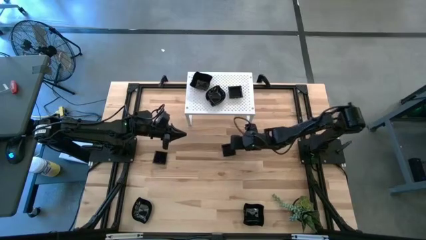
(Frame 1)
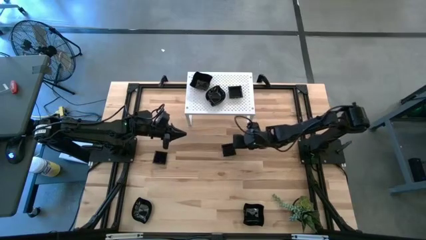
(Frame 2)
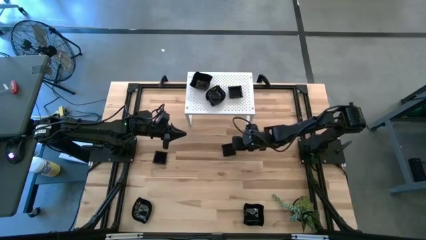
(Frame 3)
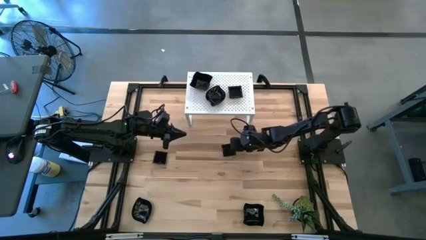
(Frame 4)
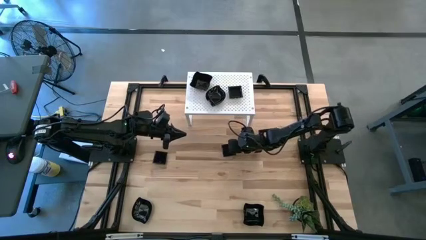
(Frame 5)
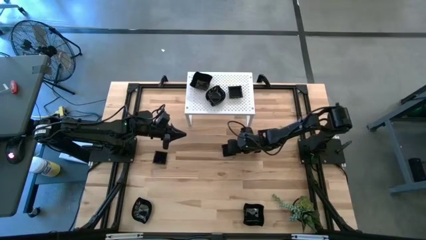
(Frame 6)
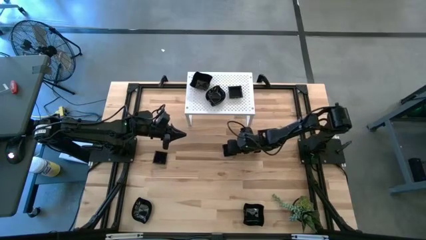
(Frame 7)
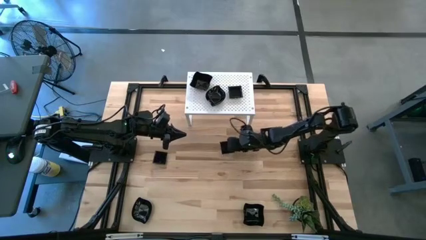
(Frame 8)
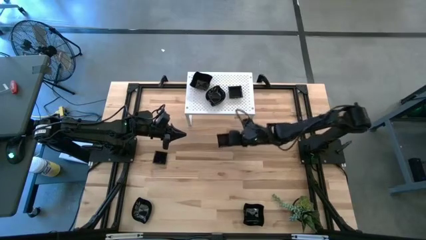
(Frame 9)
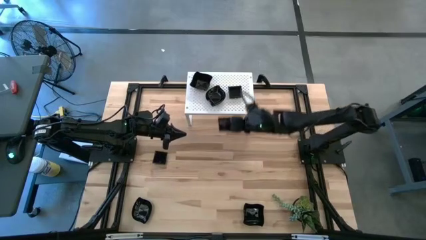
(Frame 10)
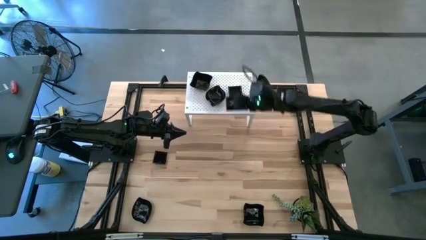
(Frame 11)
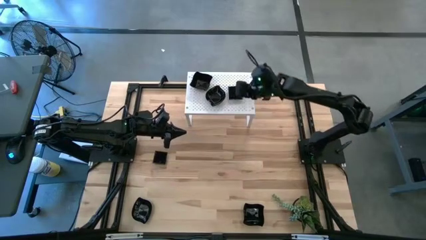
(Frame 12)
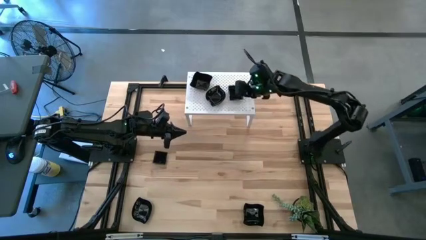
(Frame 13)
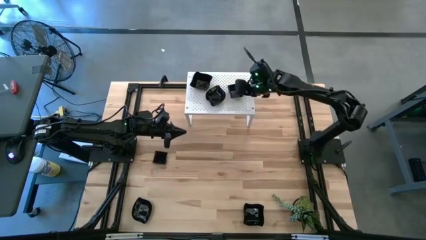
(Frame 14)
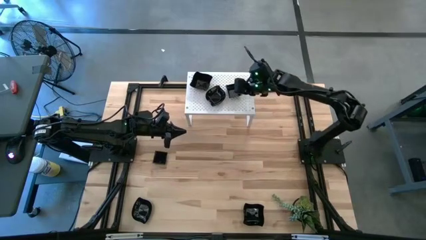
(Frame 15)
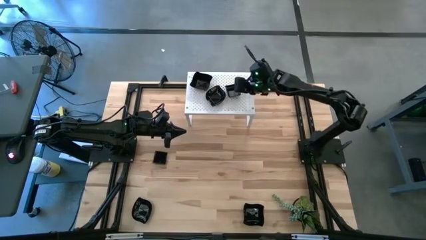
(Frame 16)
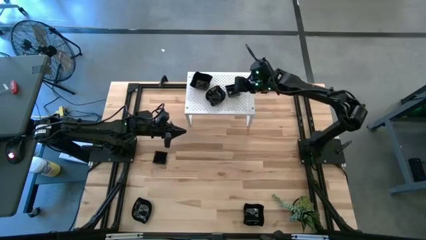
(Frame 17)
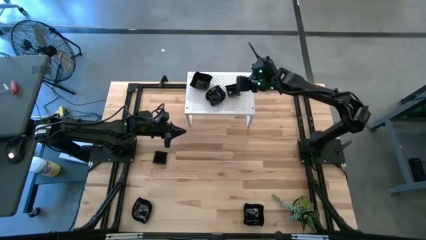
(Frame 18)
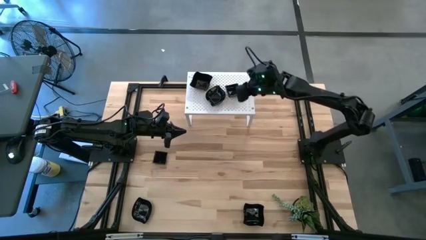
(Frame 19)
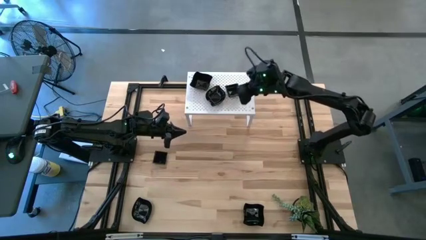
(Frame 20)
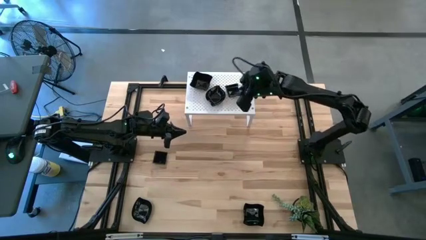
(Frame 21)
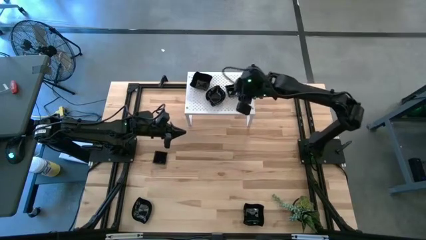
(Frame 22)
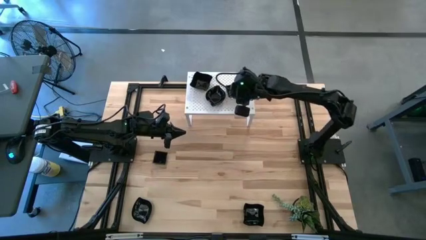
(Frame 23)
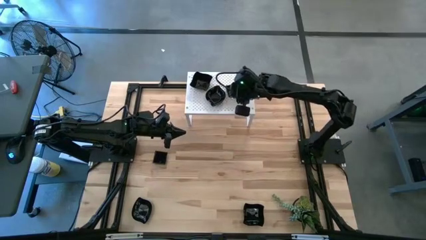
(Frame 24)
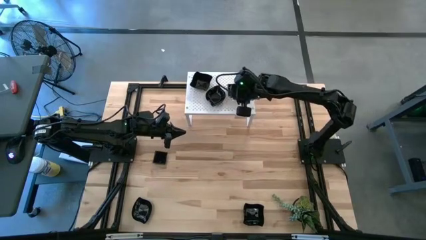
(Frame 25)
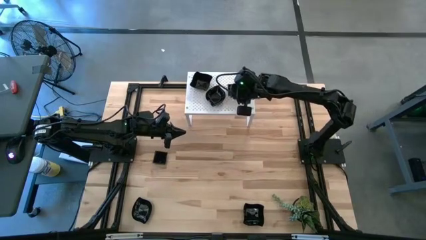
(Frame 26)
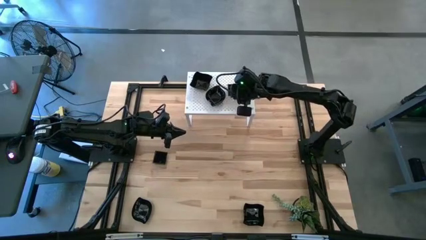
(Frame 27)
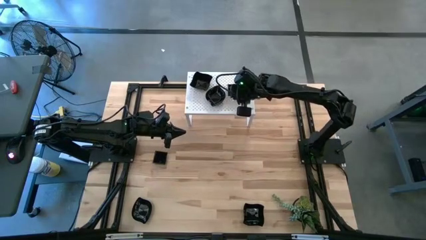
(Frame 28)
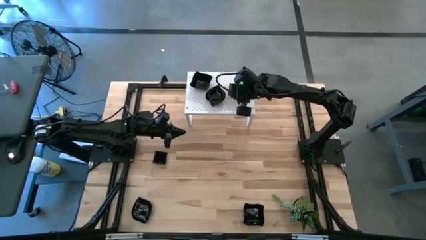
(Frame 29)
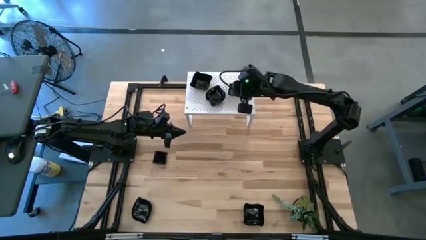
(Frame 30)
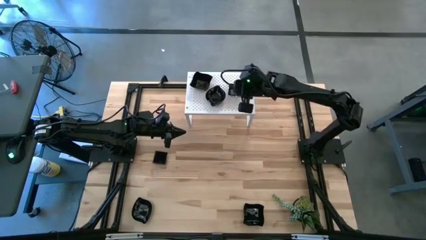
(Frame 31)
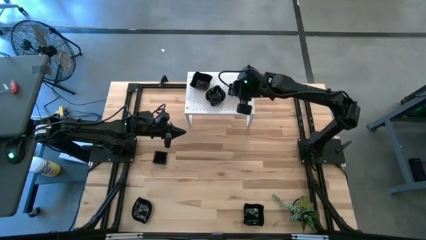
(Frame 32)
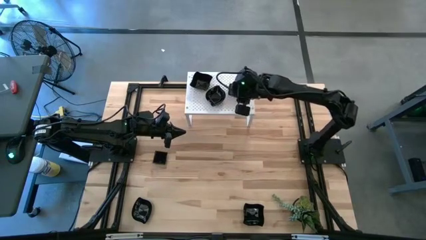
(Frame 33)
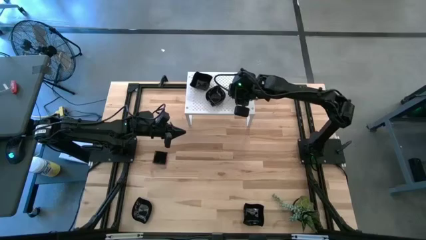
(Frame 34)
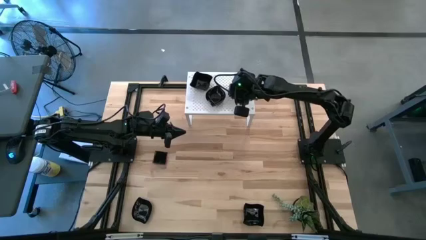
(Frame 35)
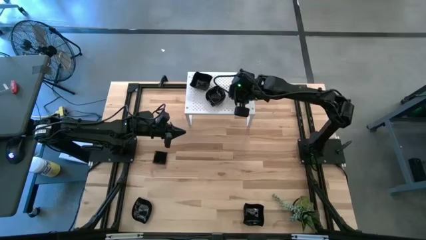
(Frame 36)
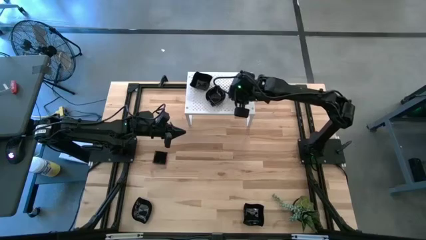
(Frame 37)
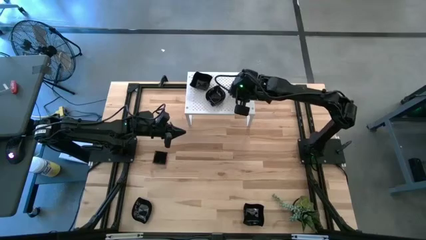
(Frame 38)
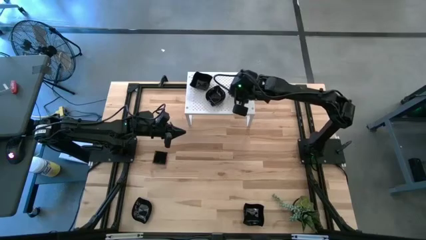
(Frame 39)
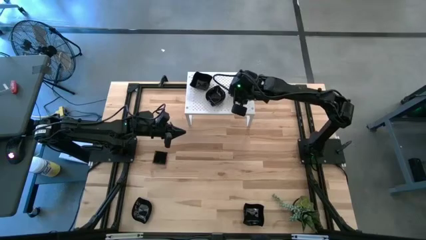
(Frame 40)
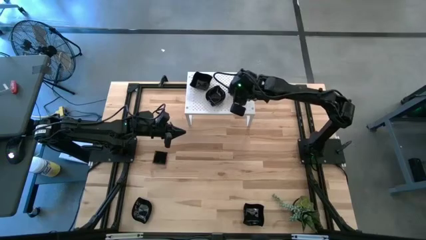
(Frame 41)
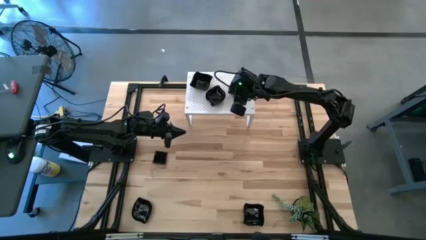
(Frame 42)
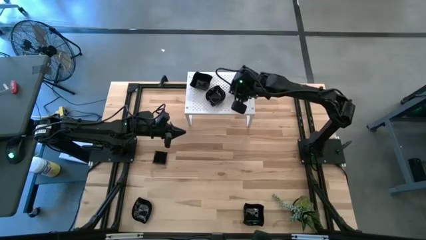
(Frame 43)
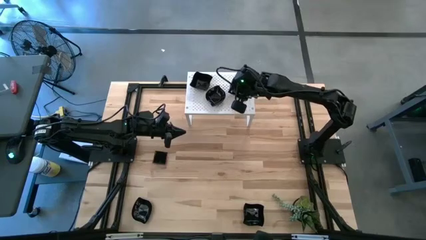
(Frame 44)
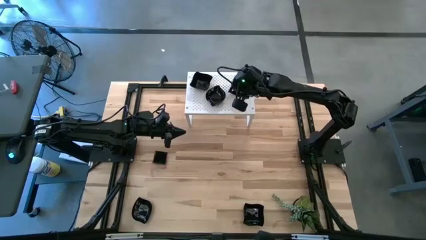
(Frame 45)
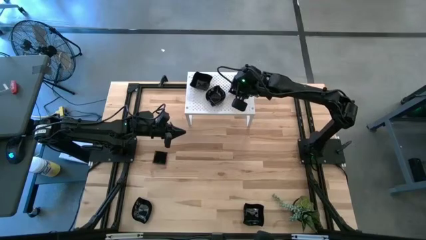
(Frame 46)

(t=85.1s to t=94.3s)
Task: Pick & Place Mini shaped plates
Stack the black square plate on top of the black square plates on the shelf

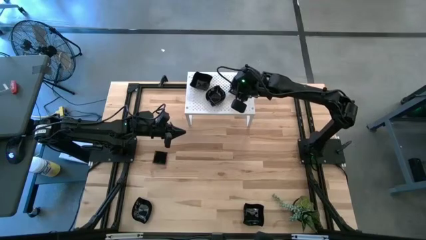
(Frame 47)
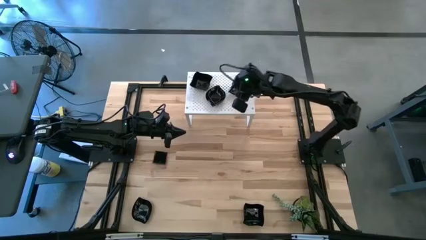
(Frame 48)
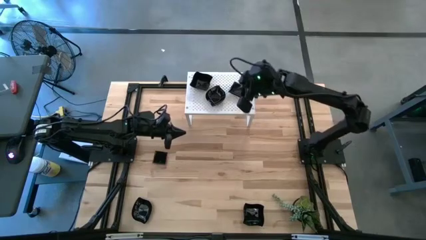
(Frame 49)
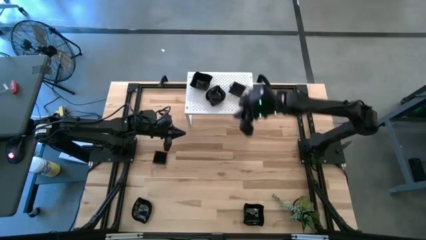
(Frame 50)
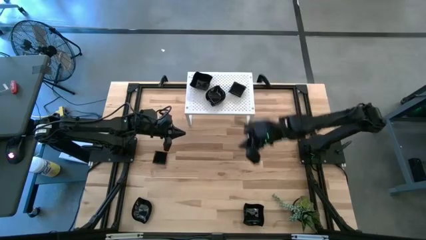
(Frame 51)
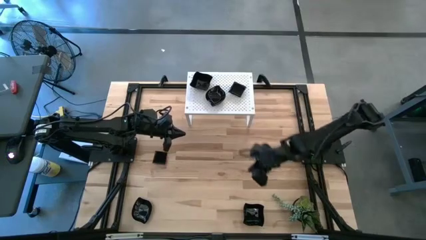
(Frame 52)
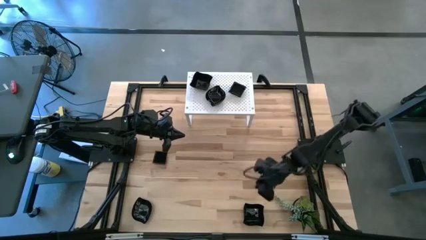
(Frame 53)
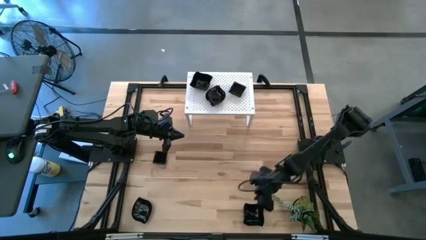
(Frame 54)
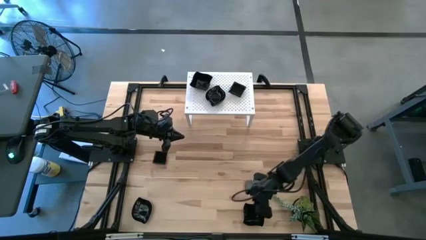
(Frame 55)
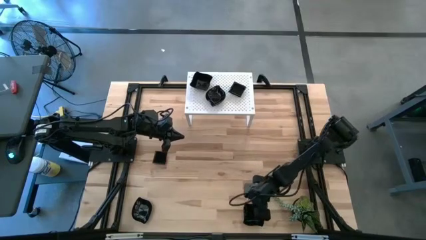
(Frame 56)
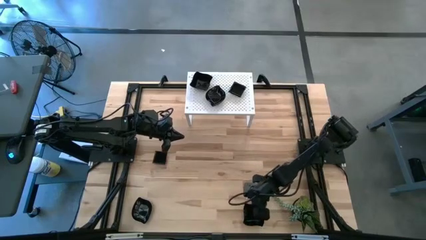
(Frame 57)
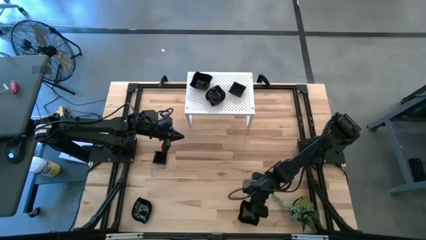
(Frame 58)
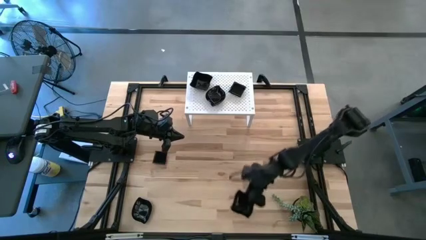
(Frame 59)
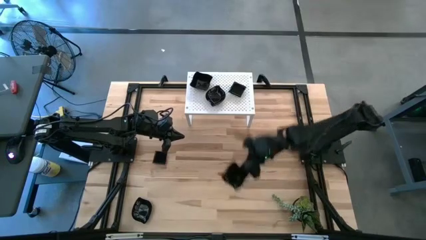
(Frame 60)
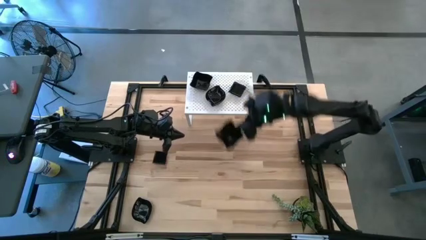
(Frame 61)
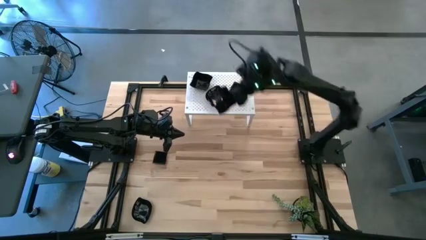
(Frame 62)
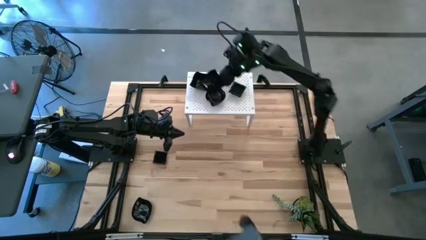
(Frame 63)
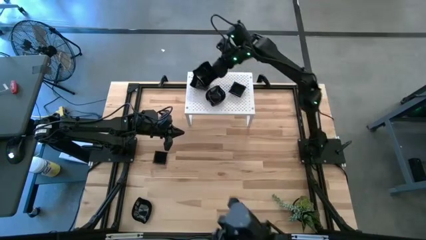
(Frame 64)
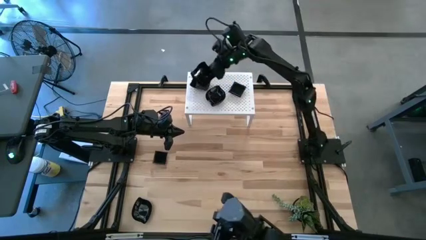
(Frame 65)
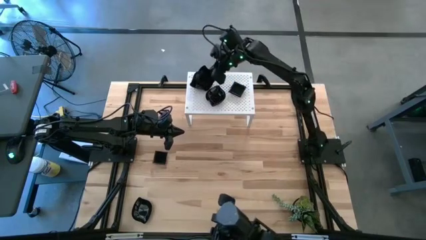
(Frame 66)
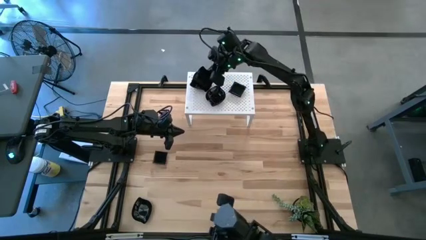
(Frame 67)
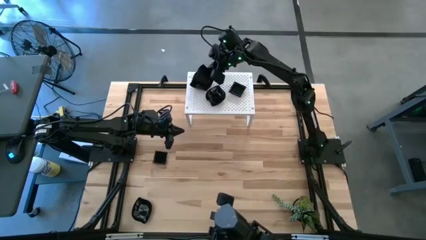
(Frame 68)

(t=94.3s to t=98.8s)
Stack the black distorted square plate on top of the black distorted square plates on the shelf

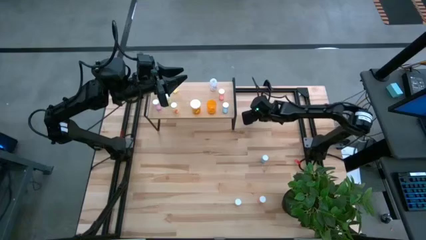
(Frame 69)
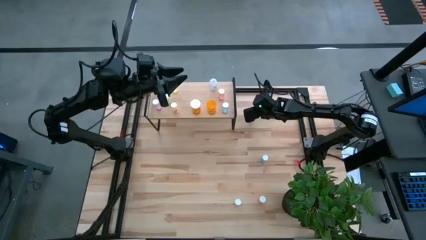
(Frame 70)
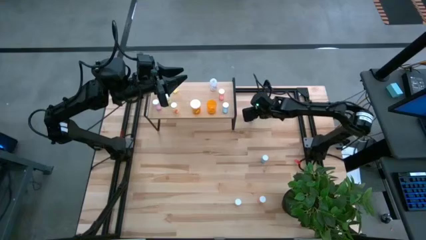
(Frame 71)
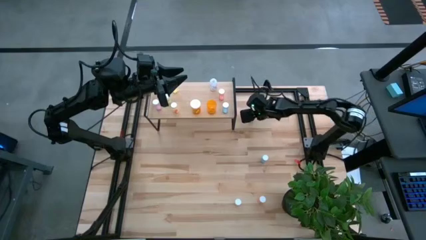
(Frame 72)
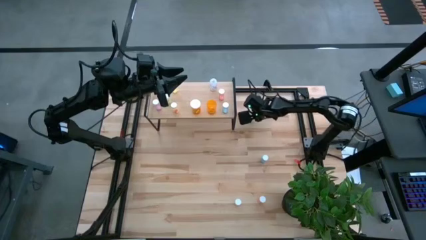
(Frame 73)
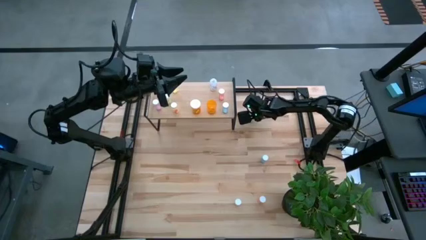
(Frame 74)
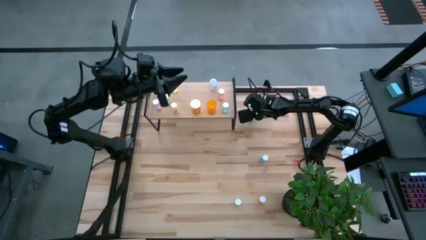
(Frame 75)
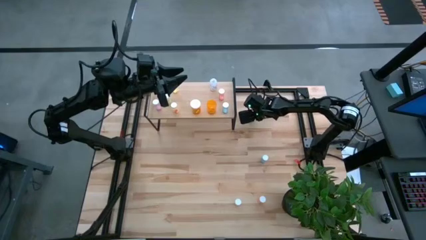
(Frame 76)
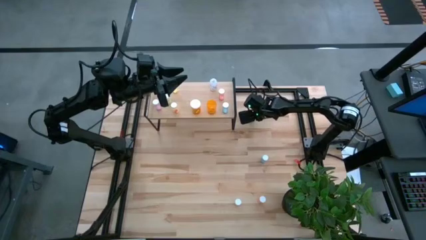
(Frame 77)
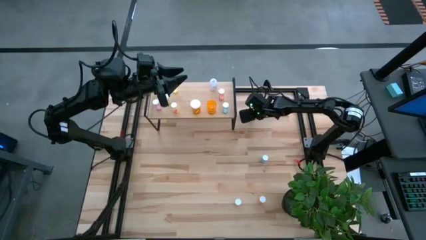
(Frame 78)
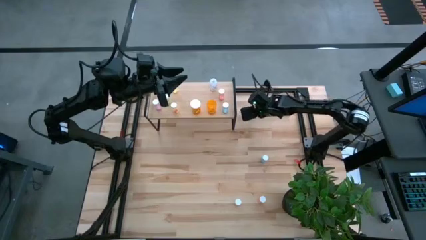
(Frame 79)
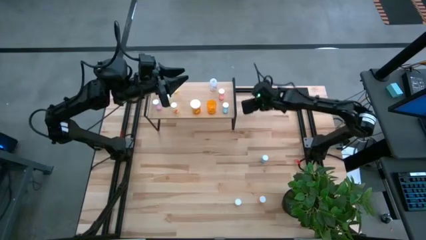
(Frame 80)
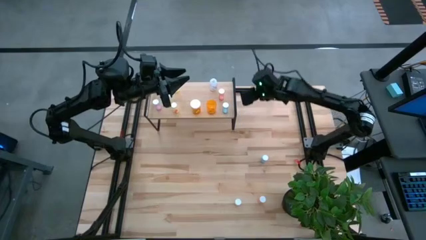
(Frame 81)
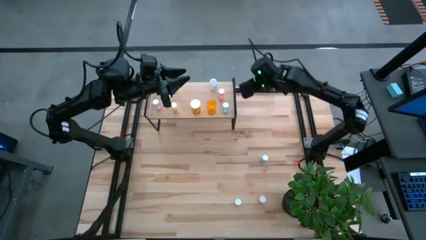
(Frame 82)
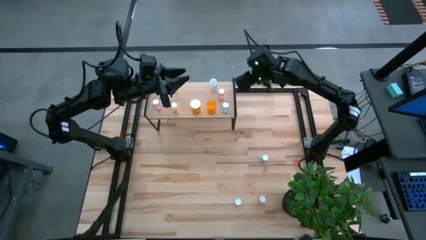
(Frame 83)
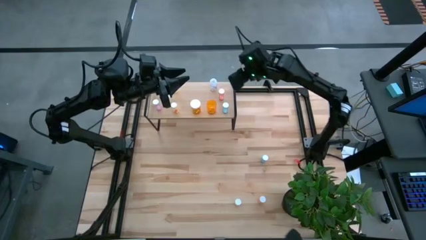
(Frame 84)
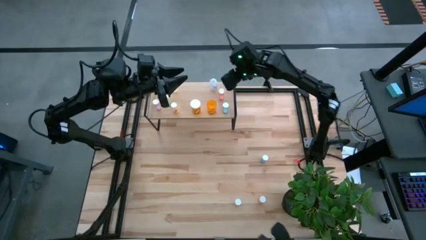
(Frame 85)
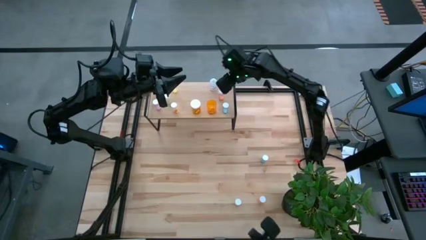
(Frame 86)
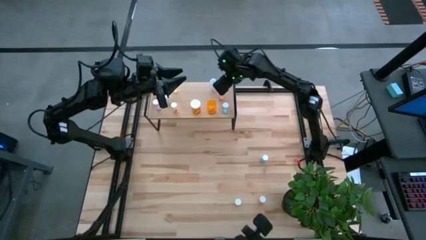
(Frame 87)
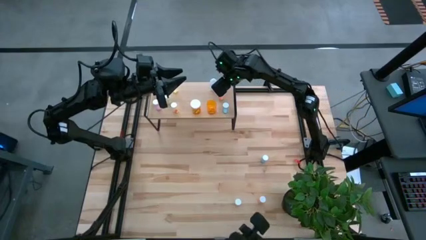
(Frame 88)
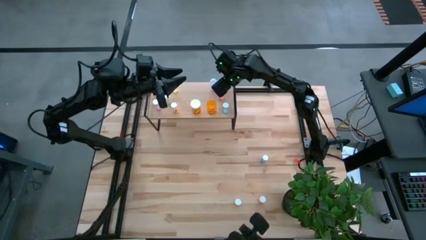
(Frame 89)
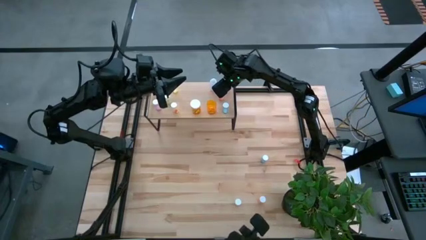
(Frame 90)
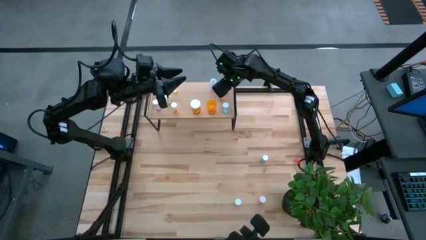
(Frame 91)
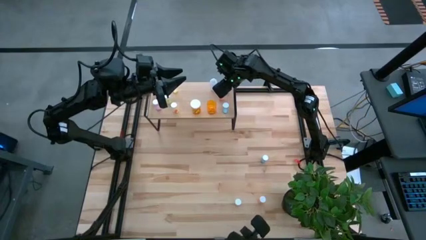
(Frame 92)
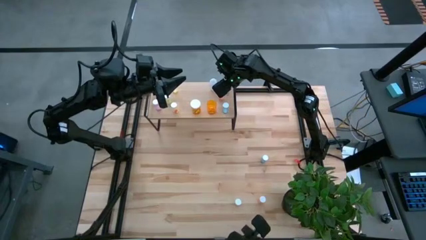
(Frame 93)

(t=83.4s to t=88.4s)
Task: Pick and place medicine bottles onto shelf by color
Put the blue pill bottle on the shelf
